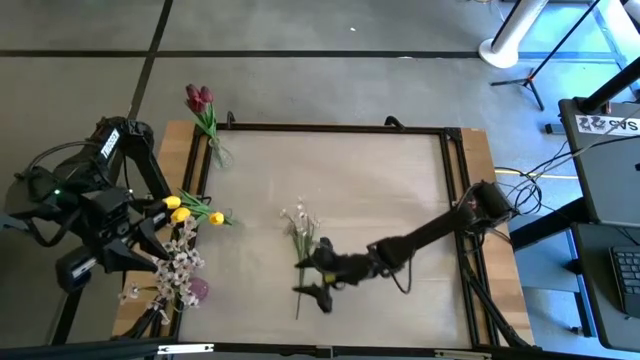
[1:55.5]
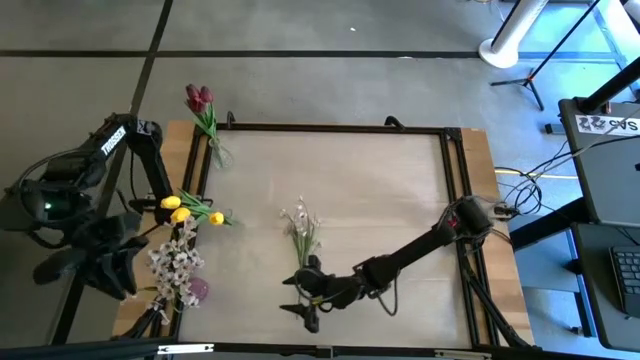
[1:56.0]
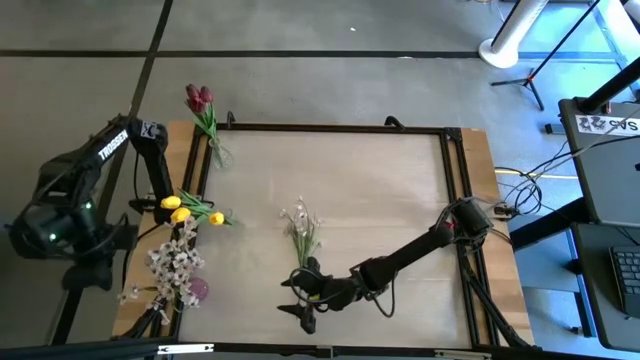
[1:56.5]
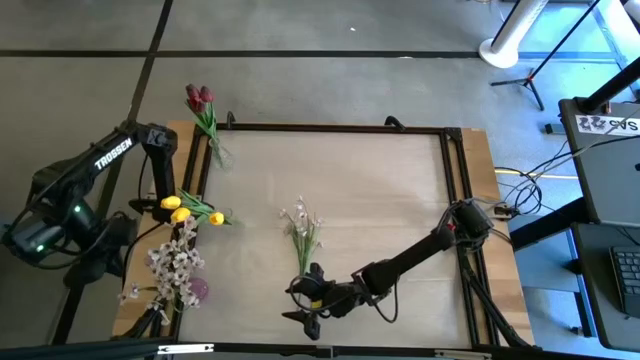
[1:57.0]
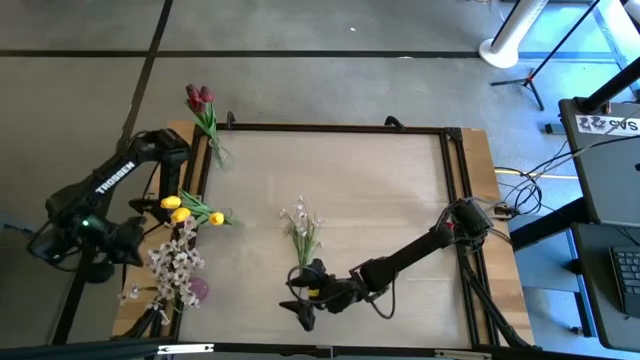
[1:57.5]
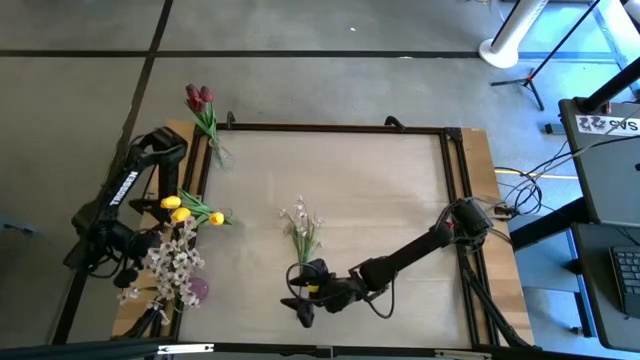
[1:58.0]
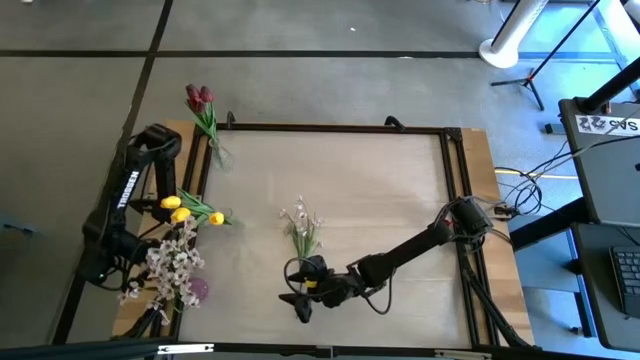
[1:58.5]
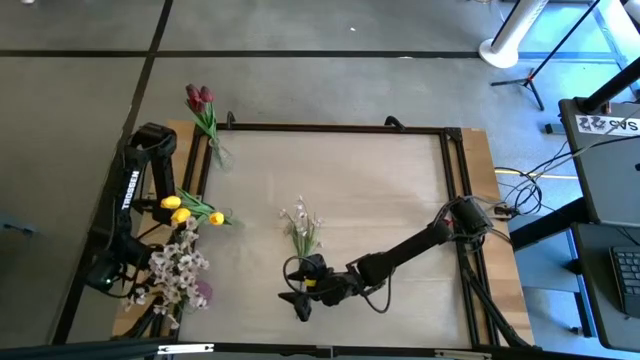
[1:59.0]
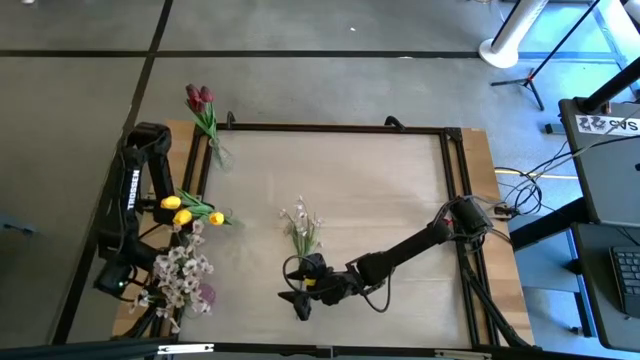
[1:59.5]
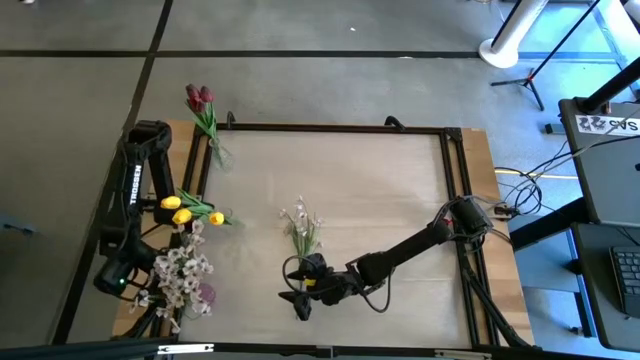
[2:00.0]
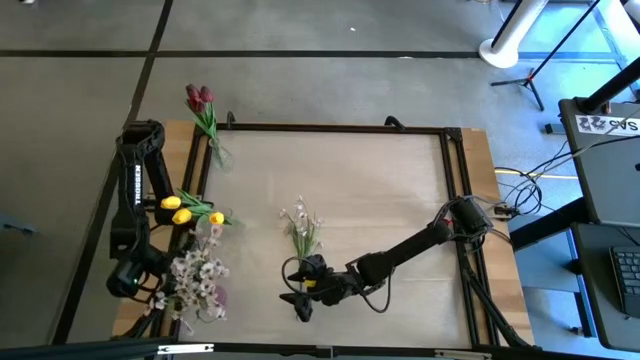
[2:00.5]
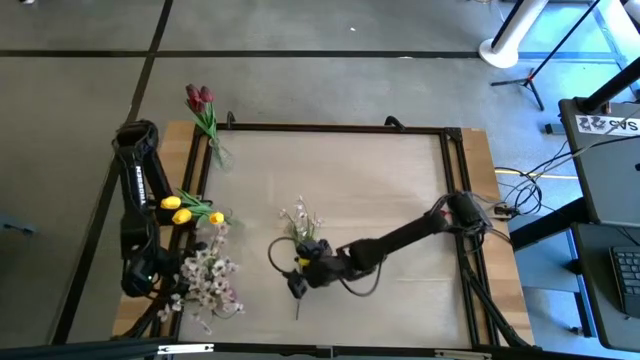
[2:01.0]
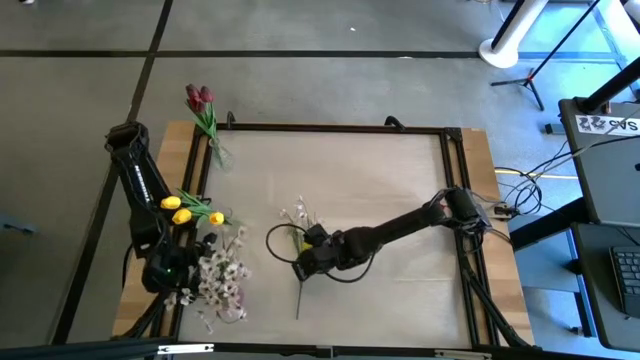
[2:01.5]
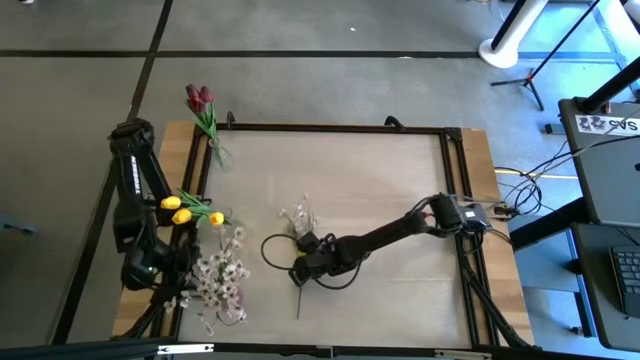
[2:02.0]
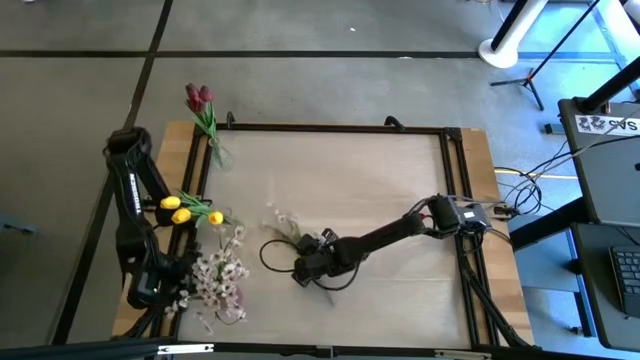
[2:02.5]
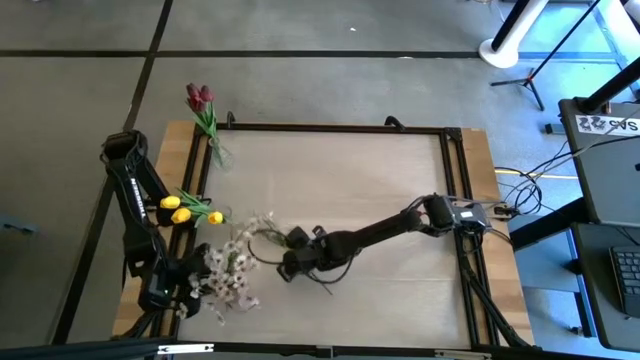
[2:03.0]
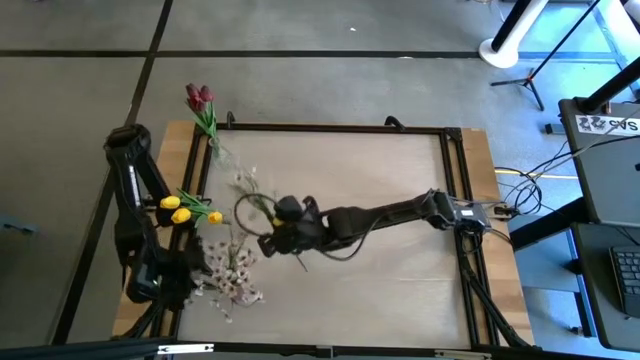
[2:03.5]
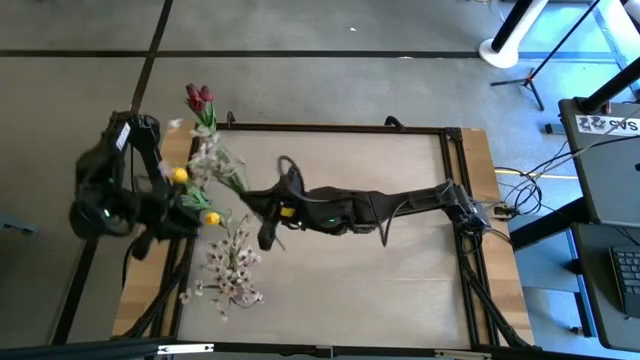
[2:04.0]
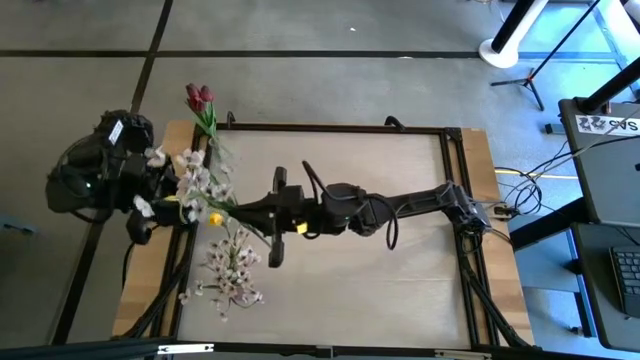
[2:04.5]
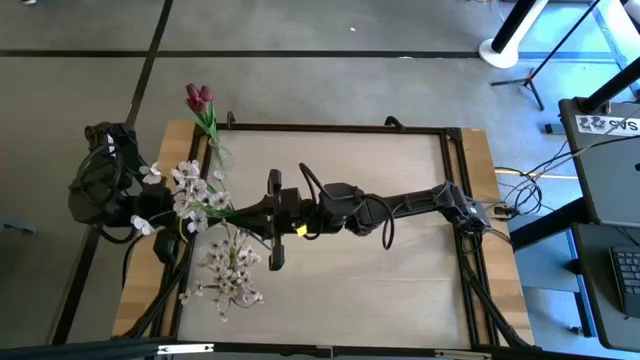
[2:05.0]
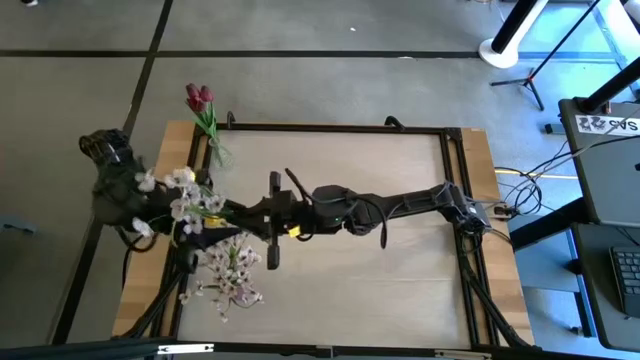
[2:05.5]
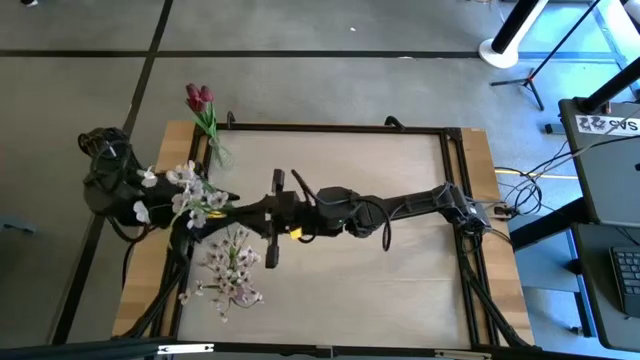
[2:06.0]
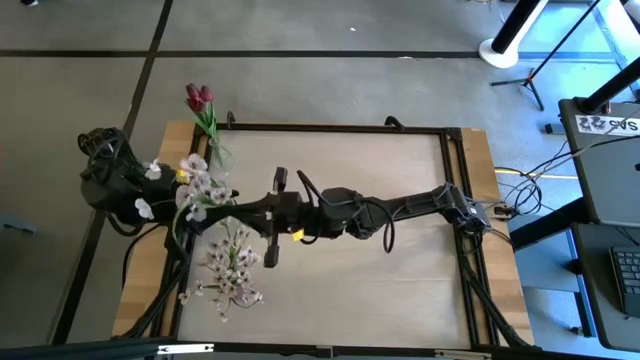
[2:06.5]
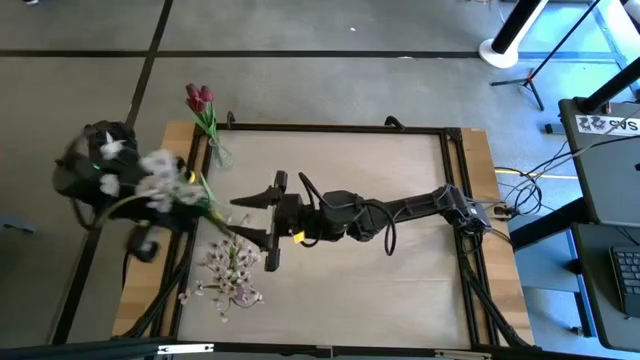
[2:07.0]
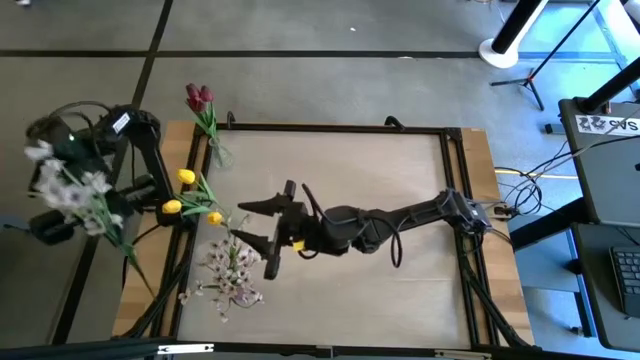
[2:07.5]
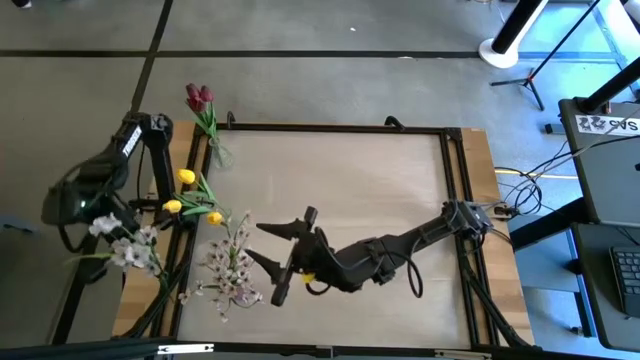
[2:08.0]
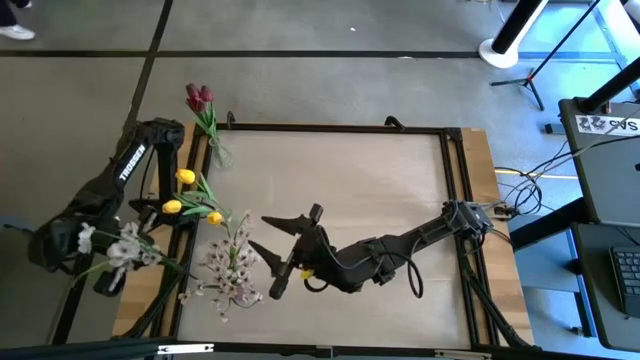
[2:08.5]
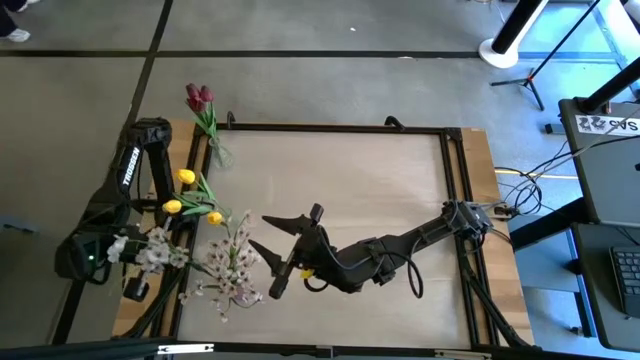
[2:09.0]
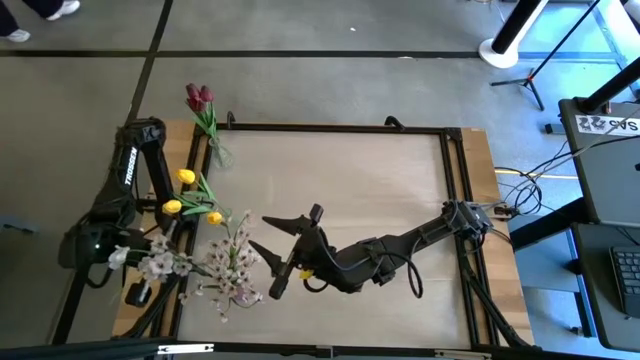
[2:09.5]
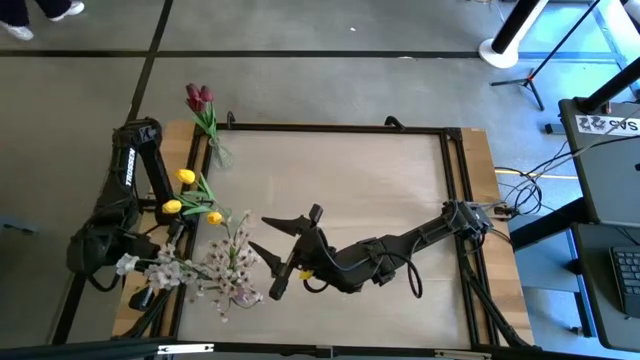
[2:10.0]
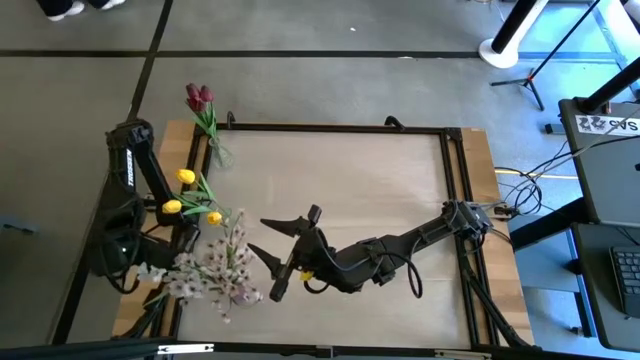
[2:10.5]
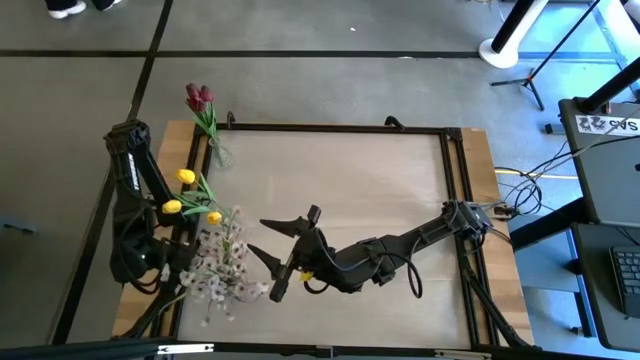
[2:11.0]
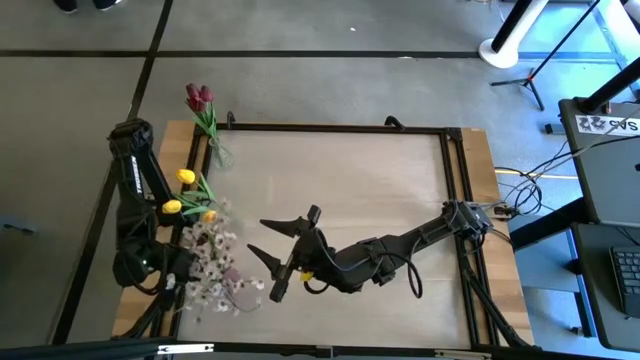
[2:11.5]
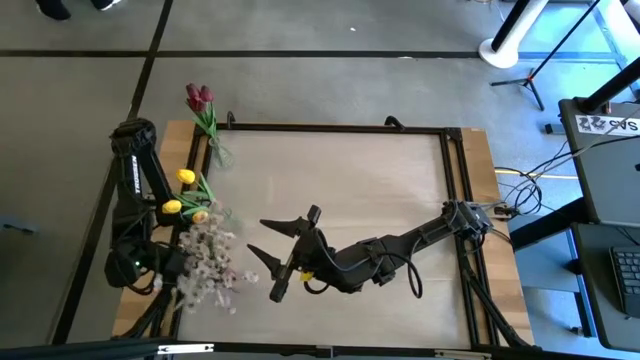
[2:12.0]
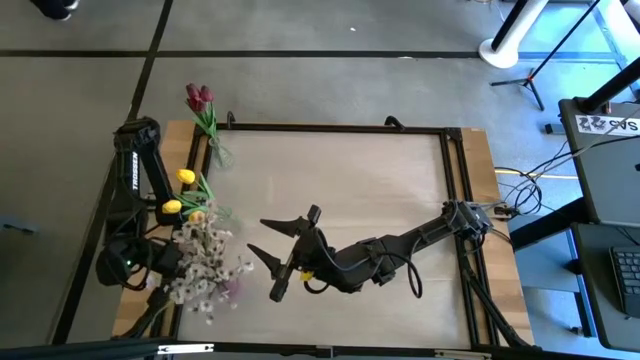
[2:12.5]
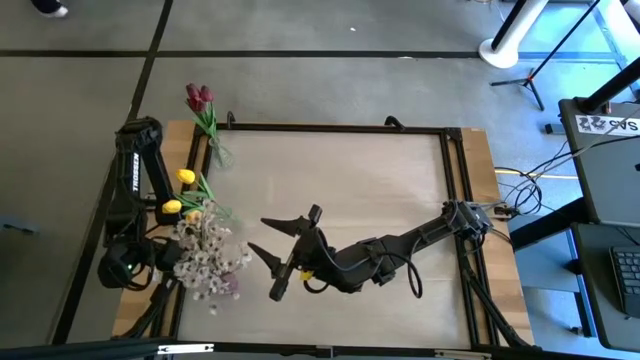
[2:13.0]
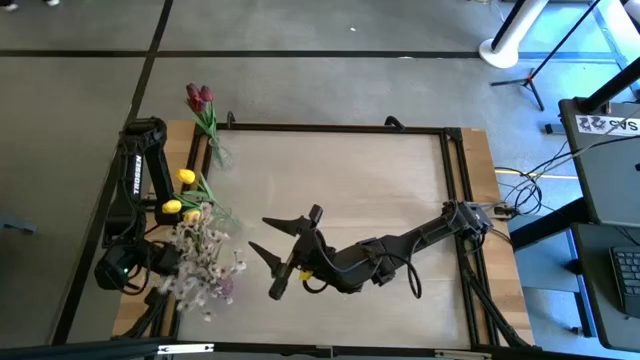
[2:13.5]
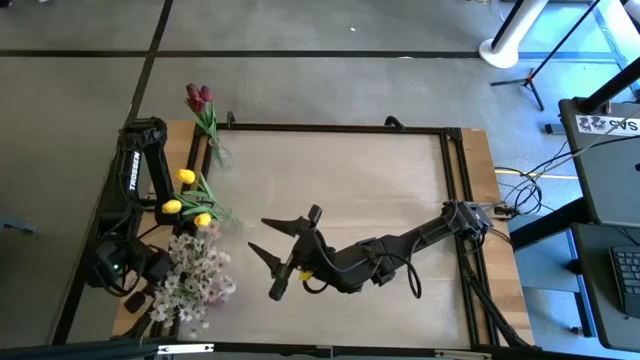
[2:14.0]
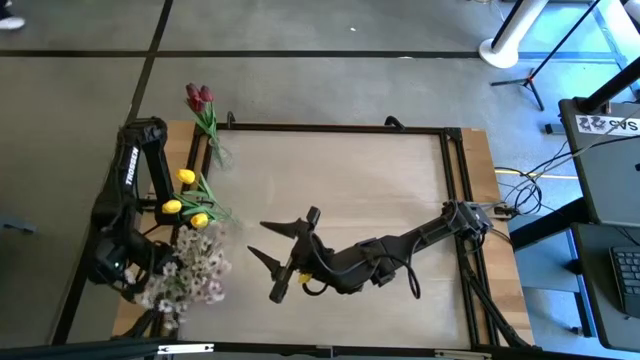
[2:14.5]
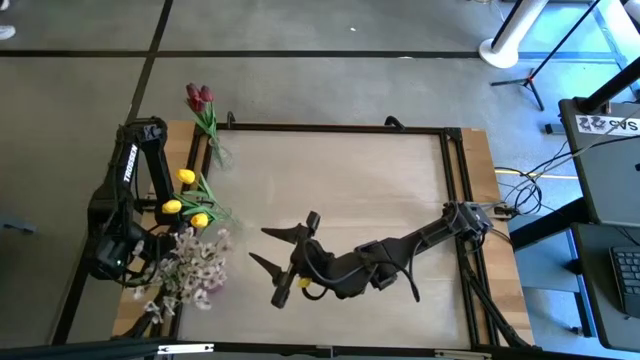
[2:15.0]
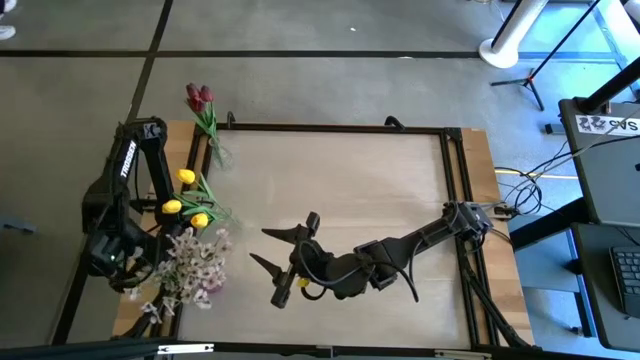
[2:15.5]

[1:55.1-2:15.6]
Task: Sort flowers into vase by color
Put the white flowers into the purple vase
